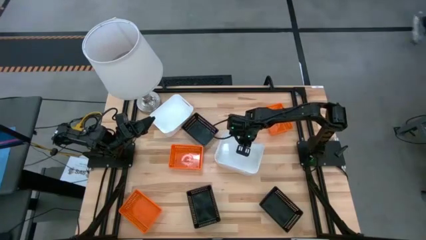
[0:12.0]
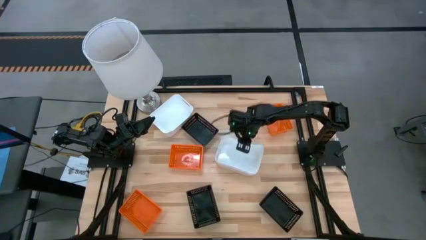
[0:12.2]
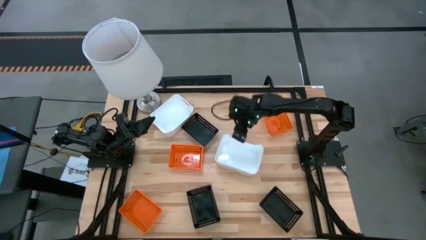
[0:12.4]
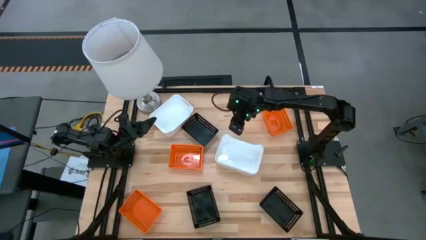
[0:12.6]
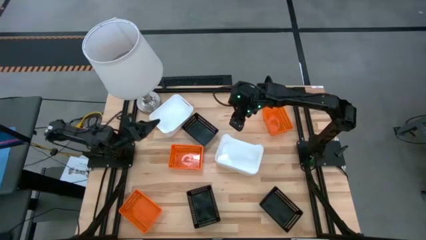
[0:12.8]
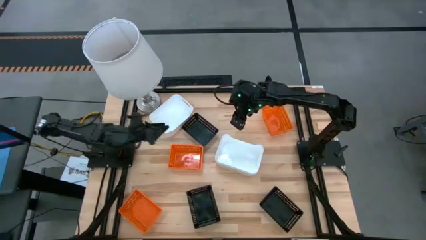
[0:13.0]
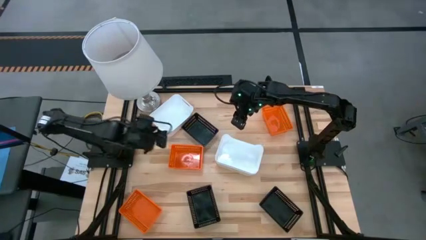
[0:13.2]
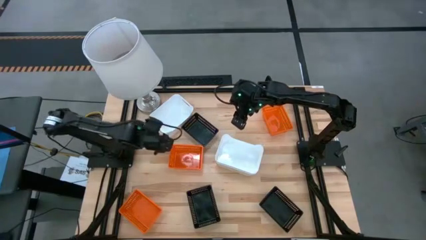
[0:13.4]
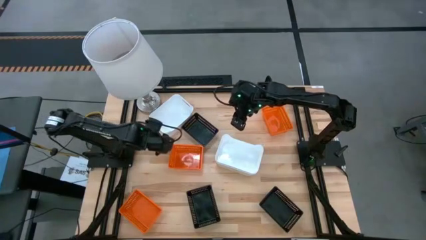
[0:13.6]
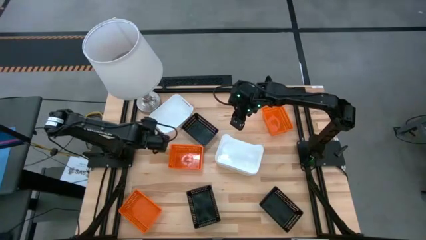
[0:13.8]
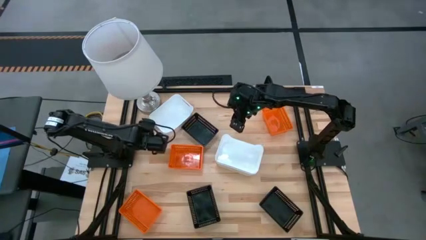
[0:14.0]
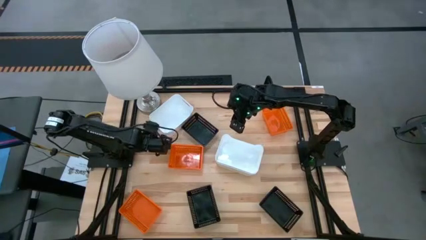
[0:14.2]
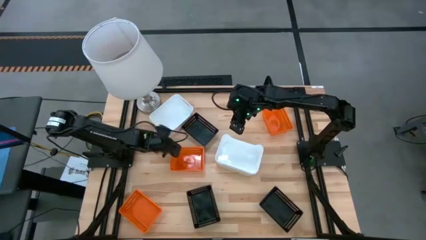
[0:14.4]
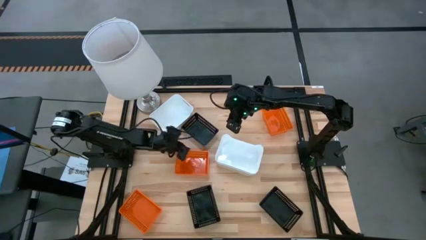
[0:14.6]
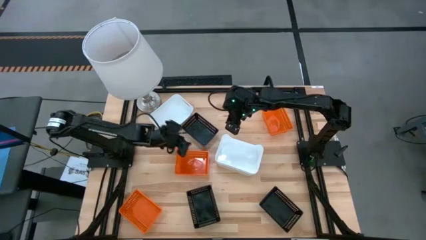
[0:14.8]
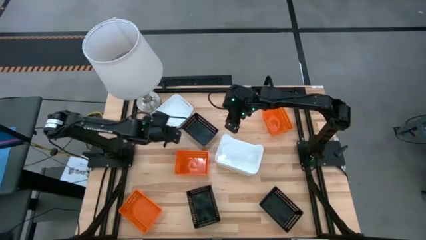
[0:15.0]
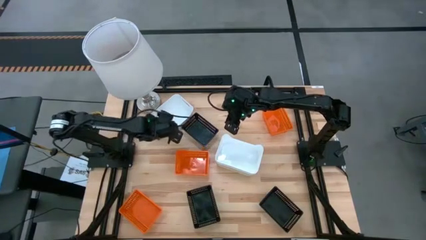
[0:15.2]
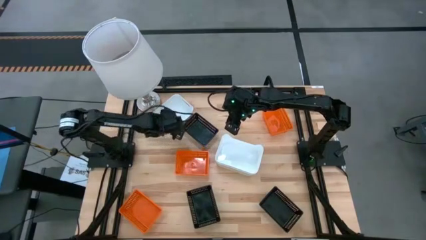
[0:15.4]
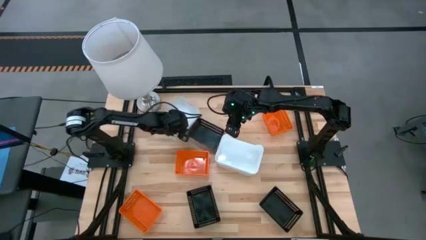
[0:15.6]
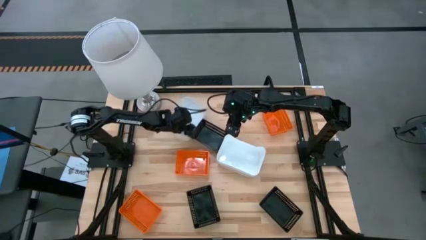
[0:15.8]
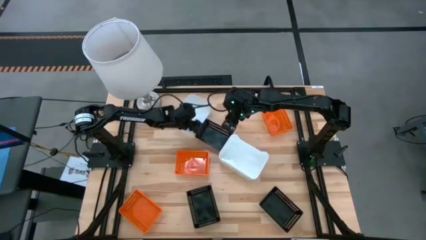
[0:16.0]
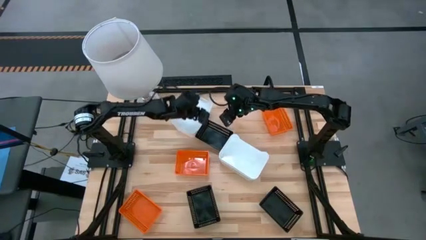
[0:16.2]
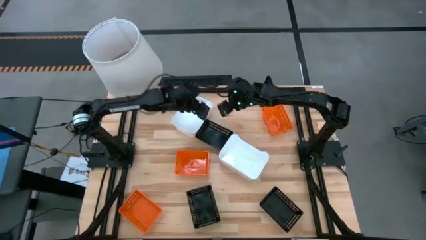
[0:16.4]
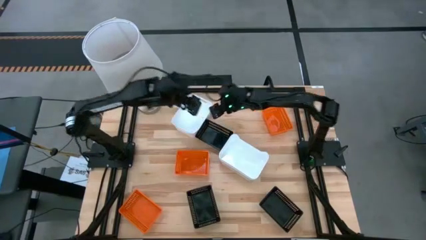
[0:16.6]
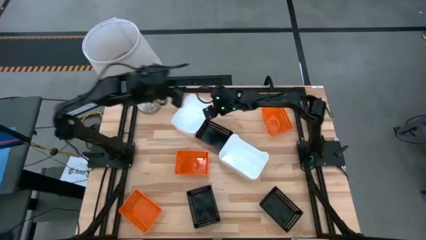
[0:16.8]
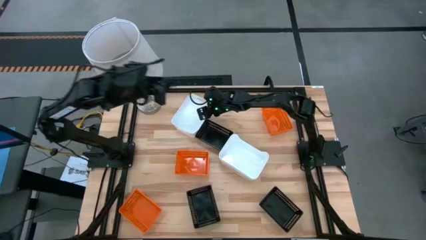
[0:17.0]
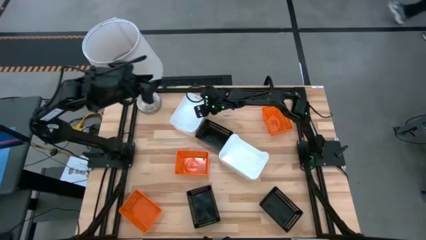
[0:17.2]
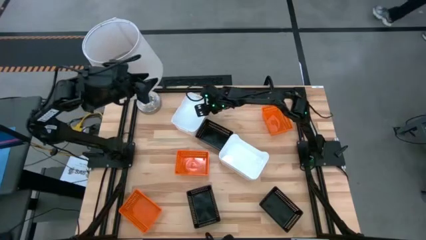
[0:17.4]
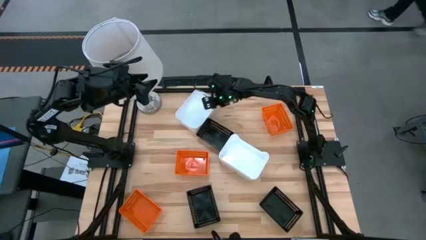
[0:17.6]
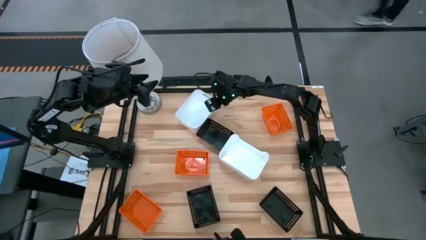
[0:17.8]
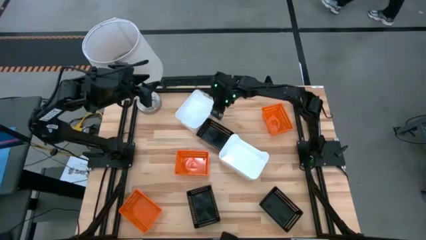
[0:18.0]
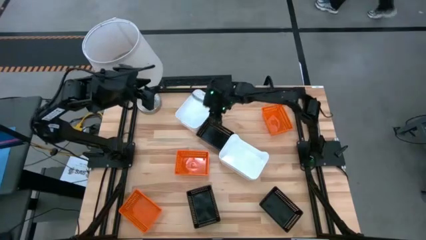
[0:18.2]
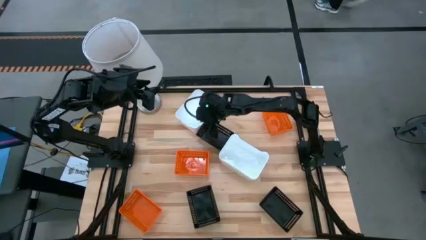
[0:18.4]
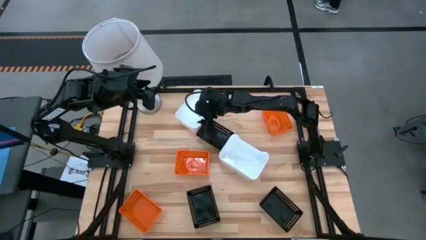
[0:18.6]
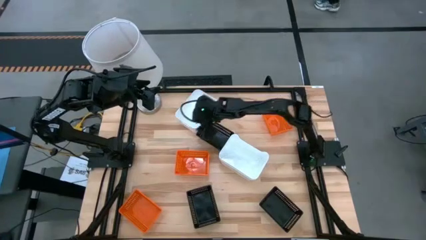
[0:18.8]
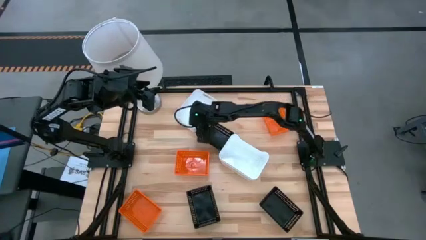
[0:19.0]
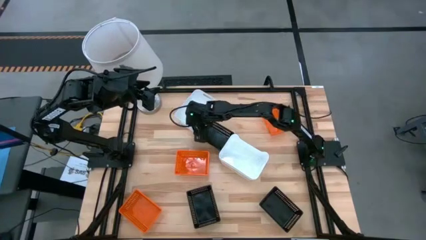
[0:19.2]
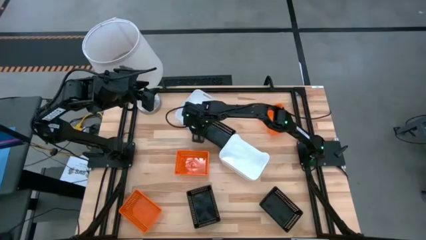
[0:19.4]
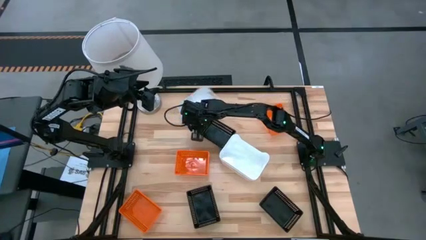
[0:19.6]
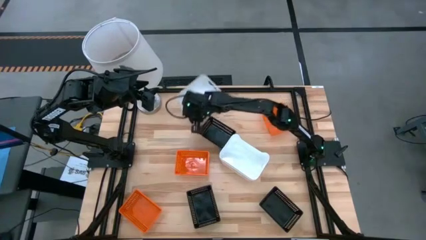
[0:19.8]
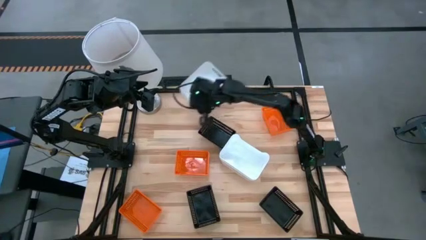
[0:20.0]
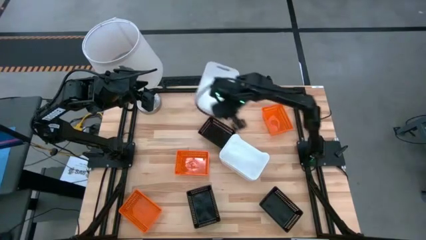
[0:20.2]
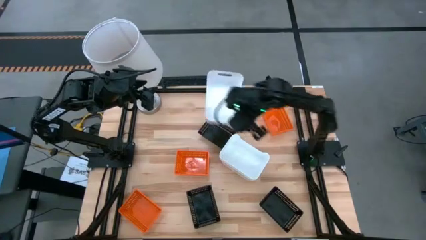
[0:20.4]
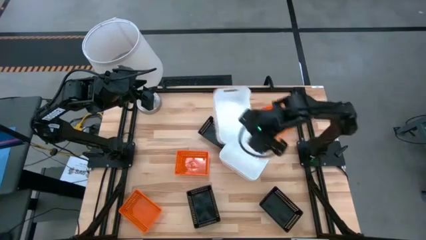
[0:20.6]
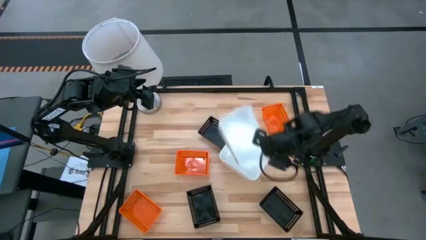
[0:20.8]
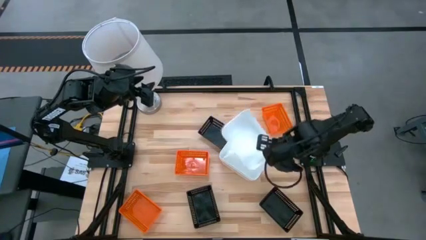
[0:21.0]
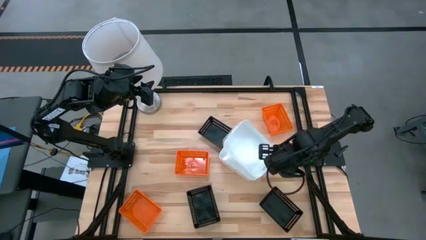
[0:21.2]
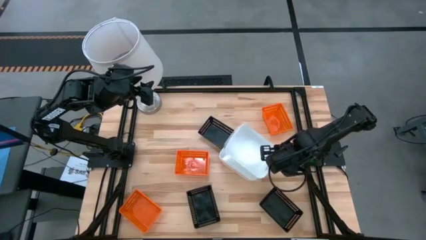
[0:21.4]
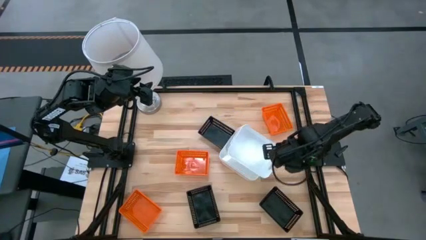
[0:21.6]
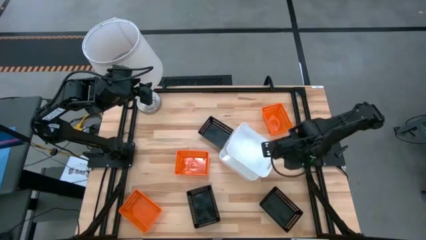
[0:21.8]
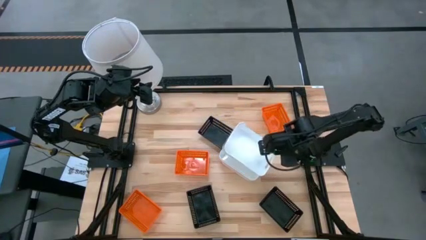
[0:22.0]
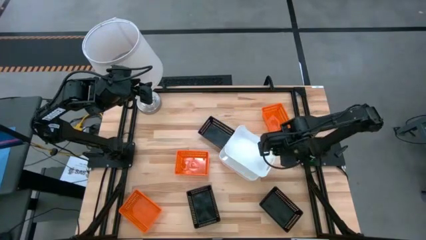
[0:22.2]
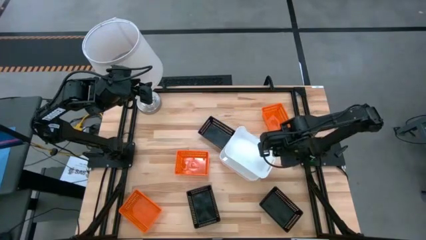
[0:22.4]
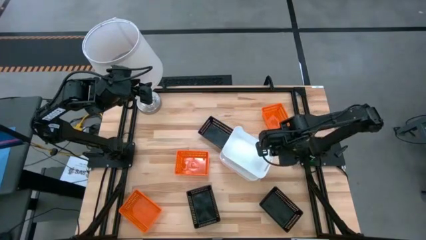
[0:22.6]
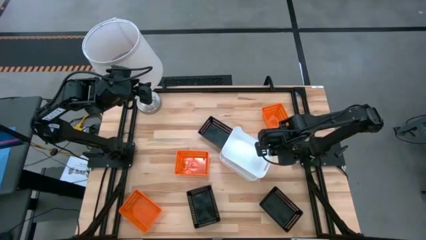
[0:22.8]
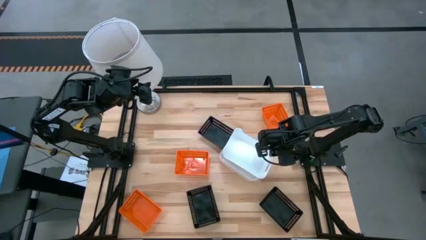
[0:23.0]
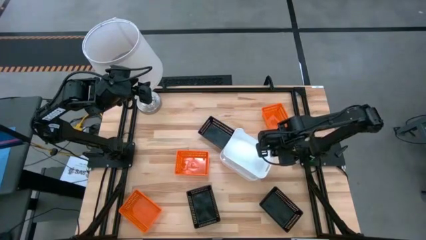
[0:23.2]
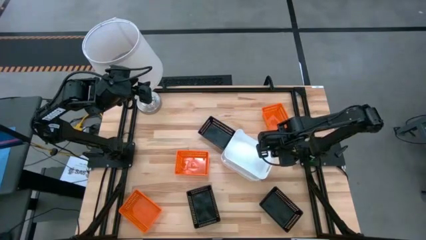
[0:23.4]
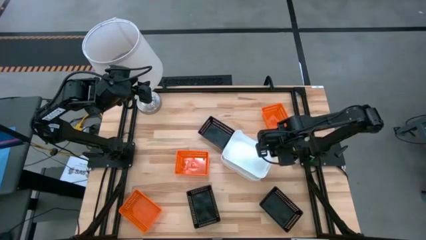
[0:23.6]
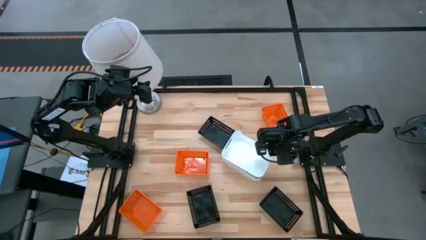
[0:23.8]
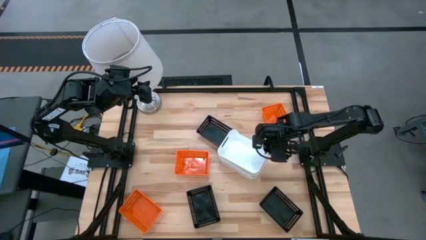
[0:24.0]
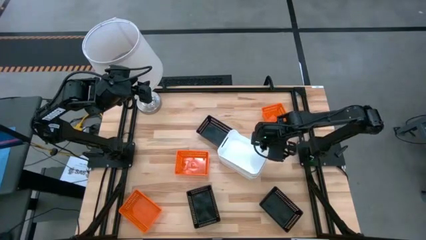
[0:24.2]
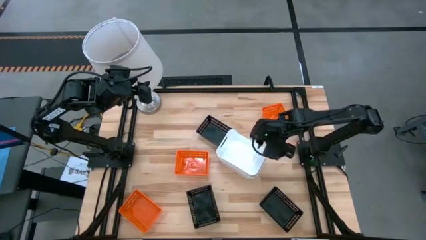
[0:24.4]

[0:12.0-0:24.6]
Stack the top white bin on top of the bottom white bin
